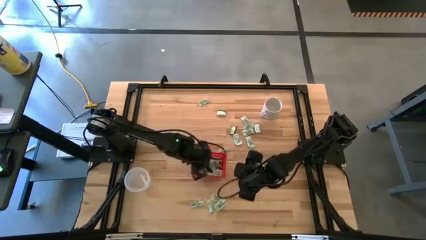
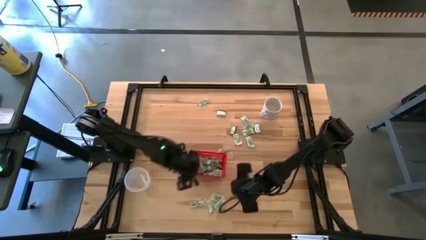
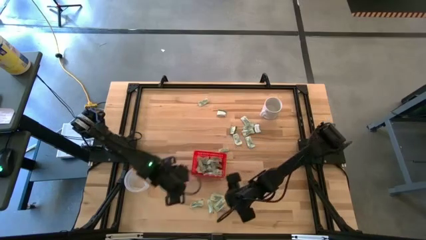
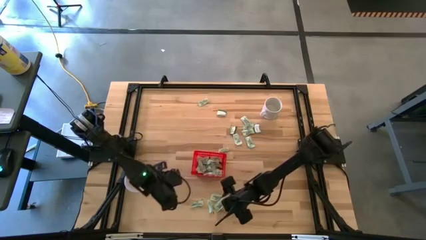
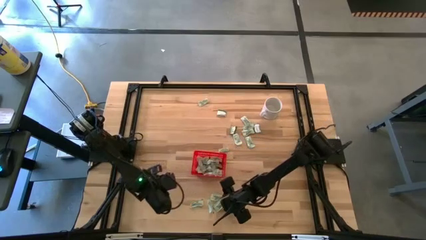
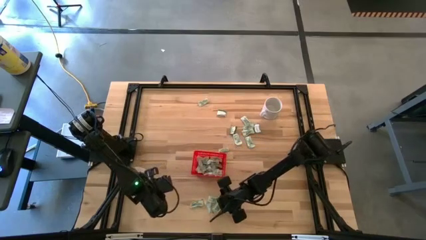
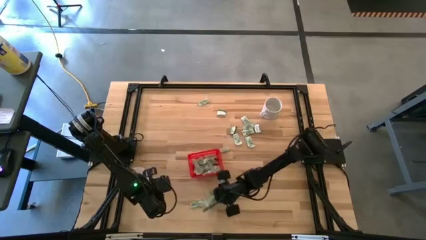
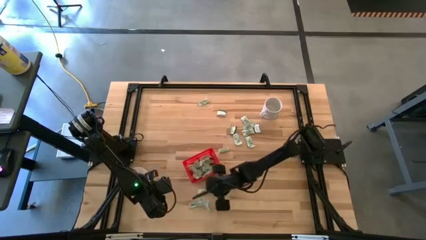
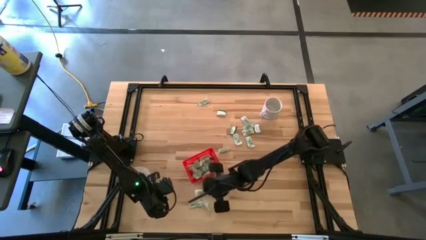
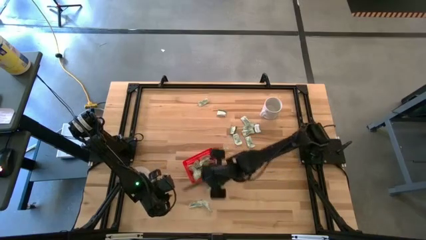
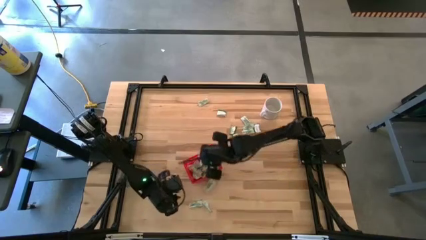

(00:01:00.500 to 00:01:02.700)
Task: Pick and place Stevia / Truvia into bins
Put the green stevia packet into the red basket

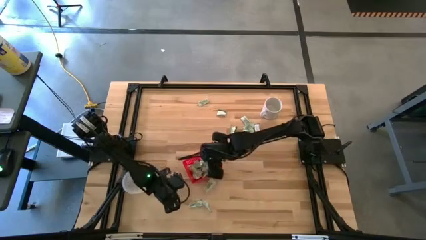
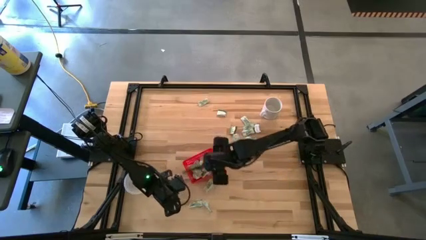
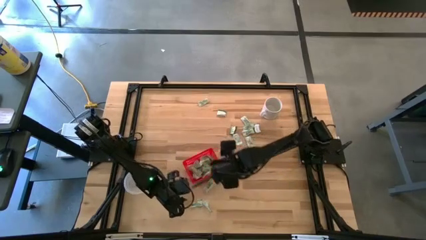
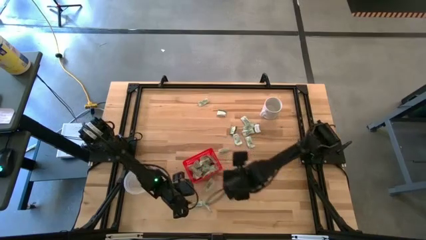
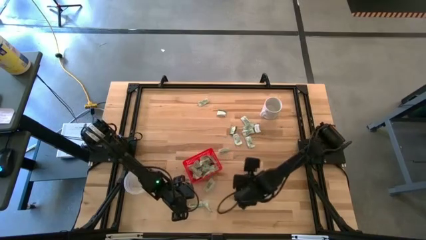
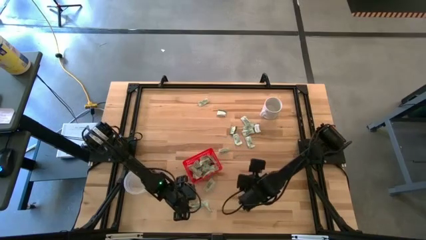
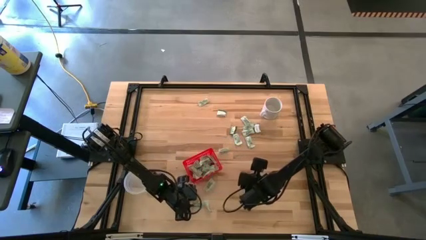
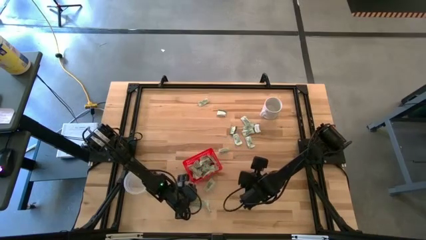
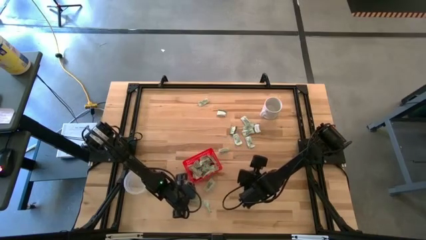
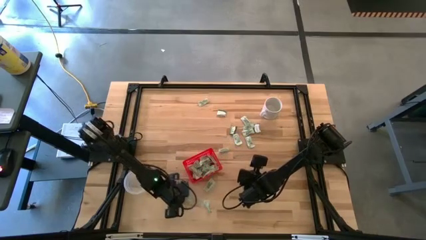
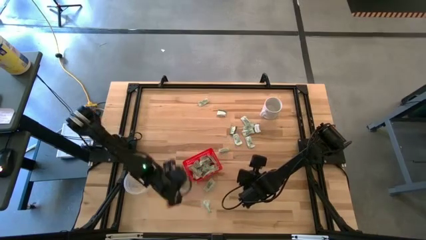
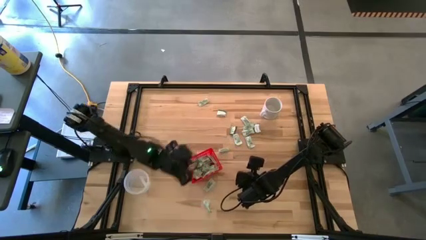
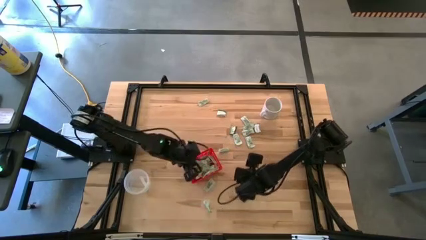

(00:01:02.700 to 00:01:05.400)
Put the green stevia packet into the red basket

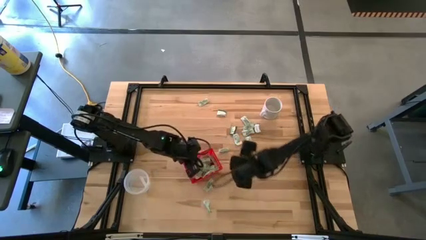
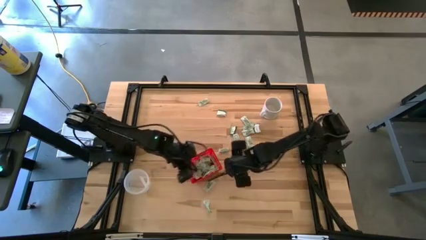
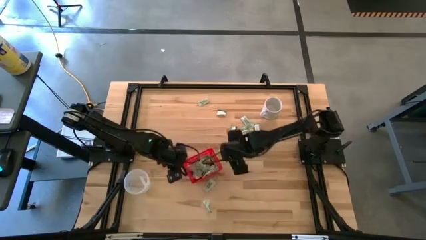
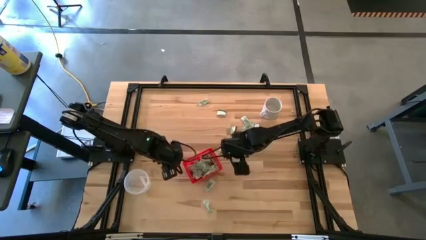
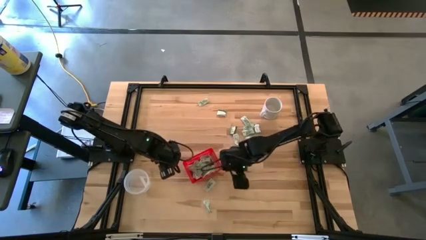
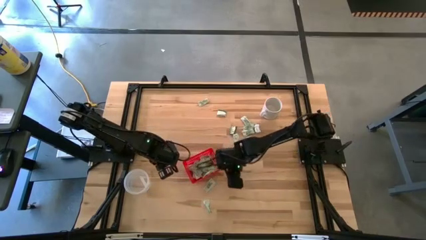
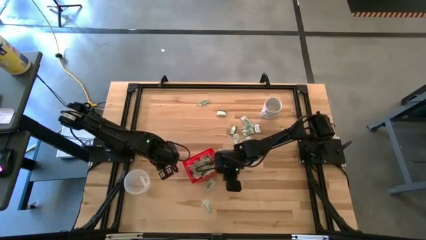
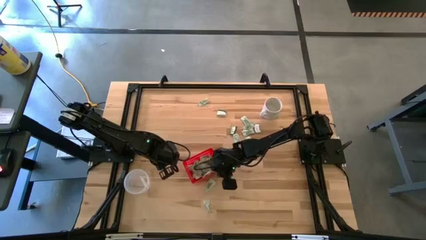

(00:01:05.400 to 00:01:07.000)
Adjust the red basket on the table

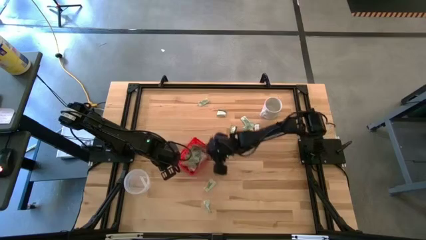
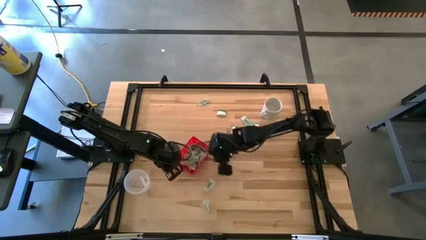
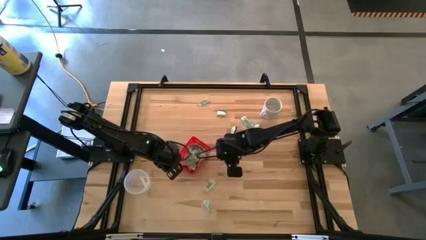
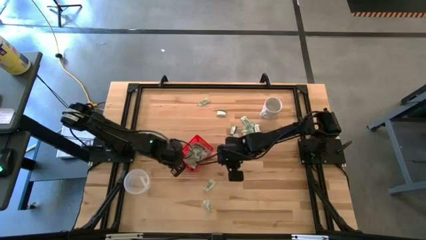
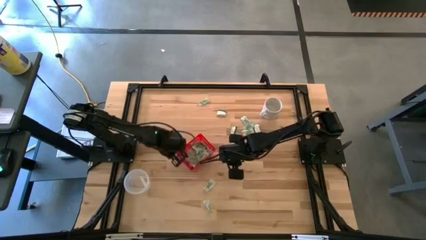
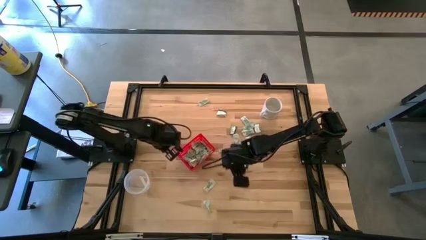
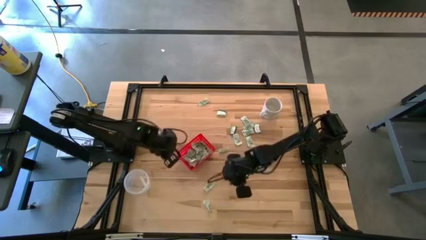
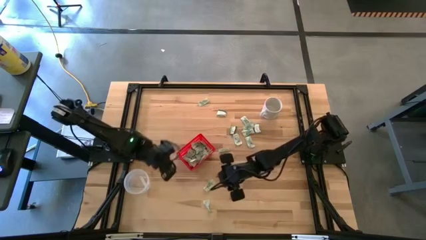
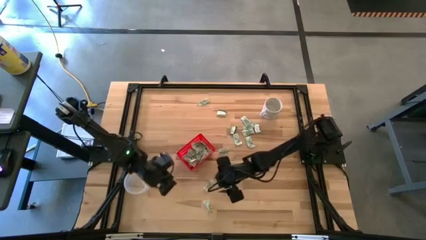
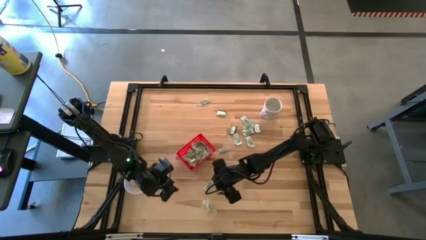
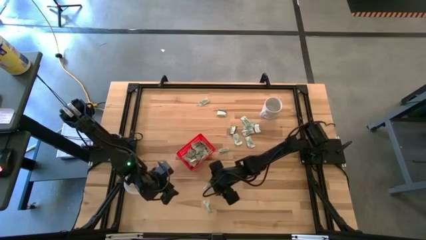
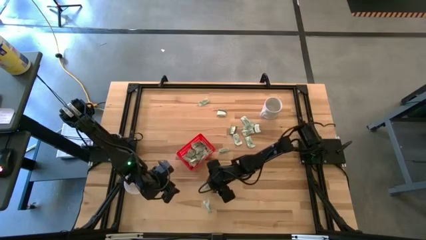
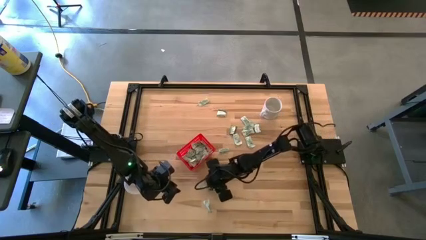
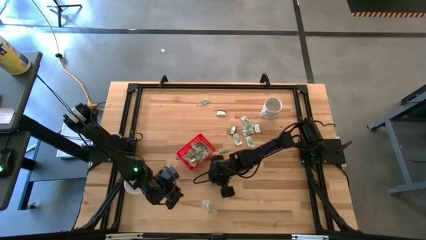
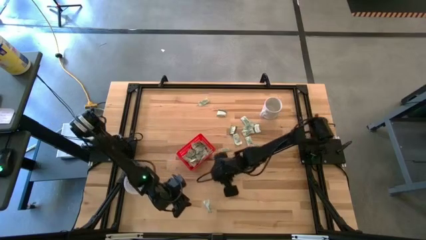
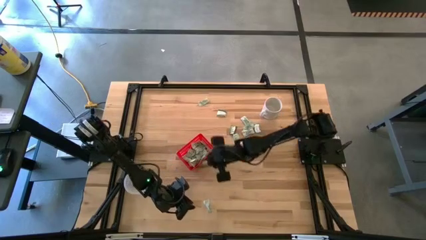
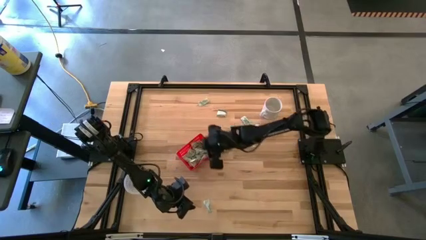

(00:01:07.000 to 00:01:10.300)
Put the green stevia packet into the red basket

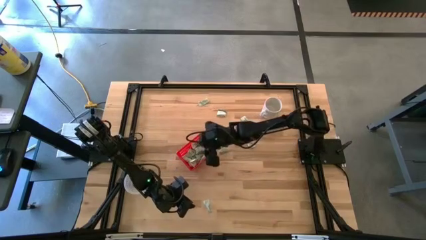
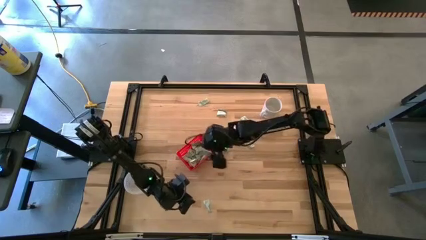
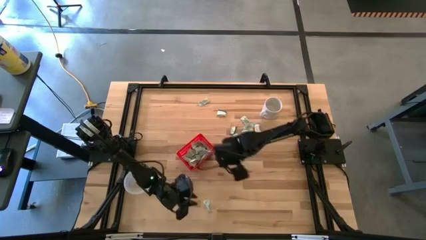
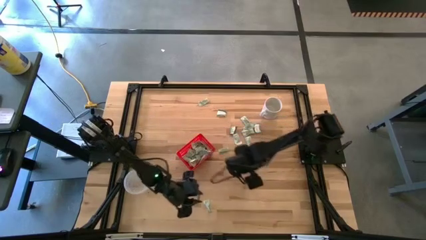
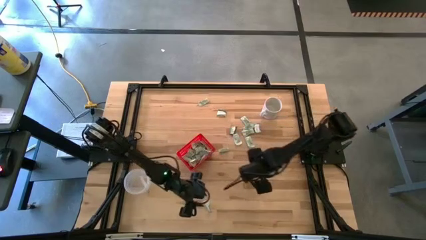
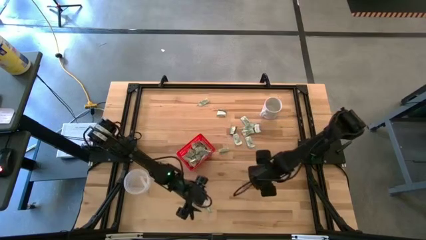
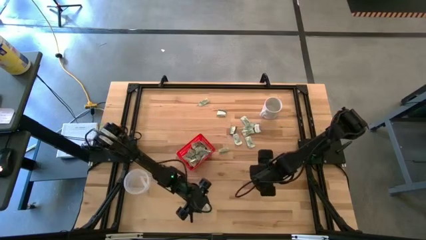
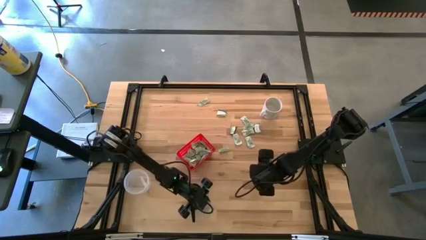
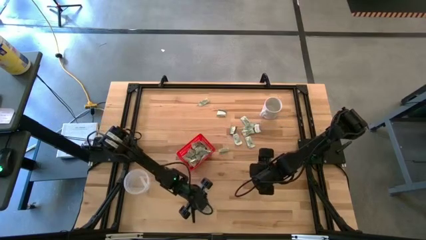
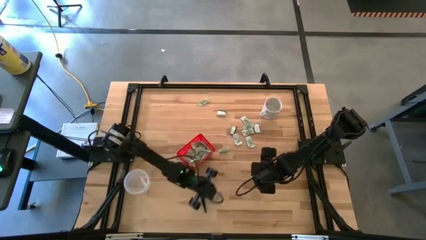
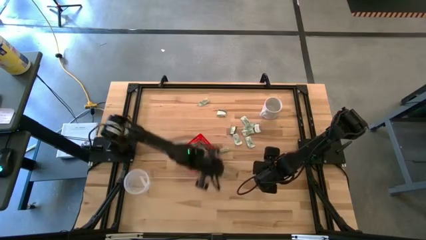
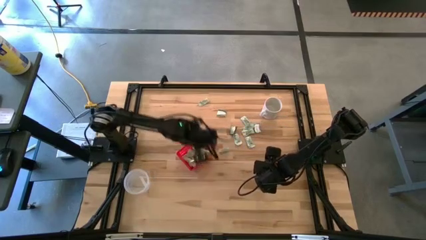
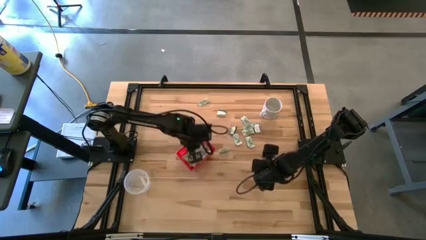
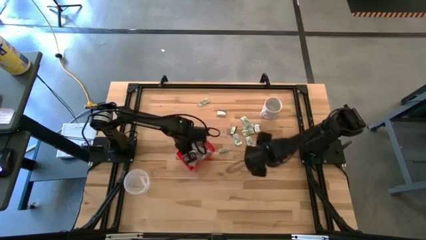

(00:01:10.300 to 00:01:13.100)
Put the green stevia packet into the red basket

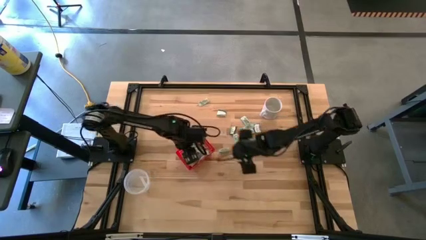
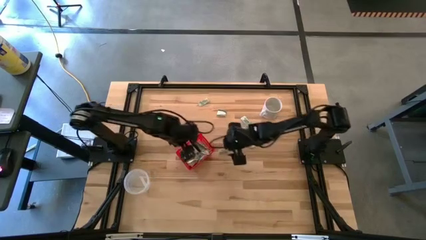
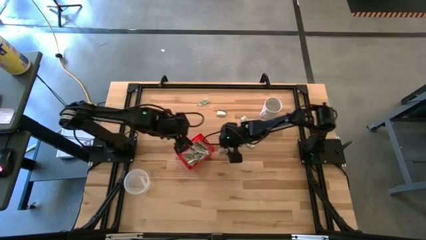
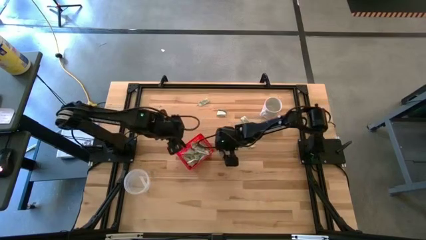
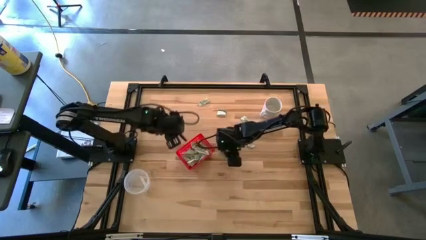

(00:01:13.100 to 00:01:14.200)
Put the green stevia packet into the red basket

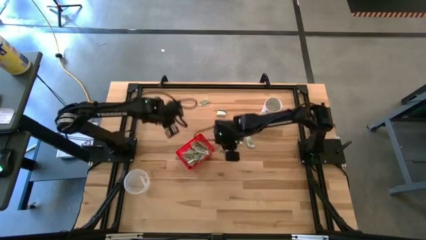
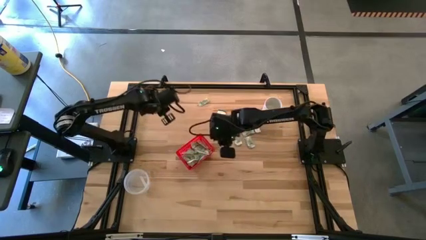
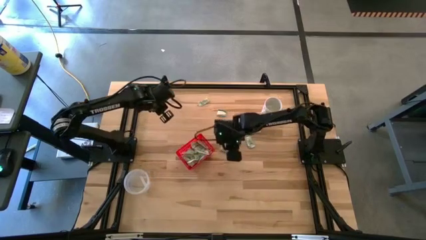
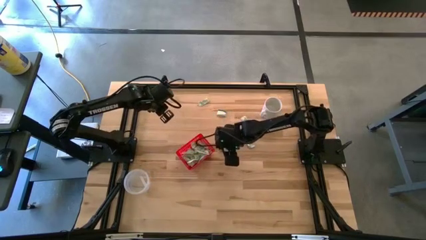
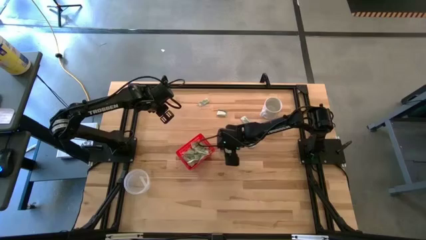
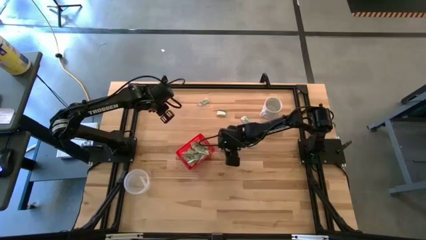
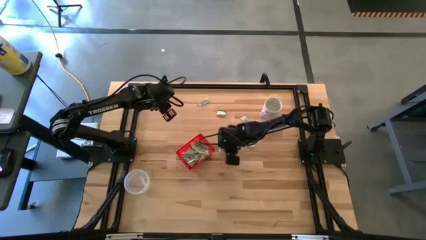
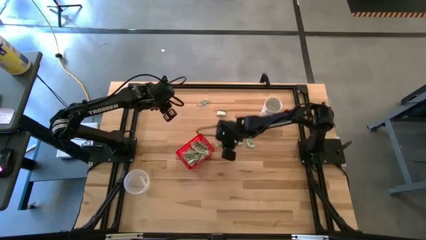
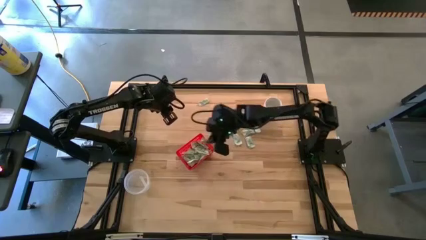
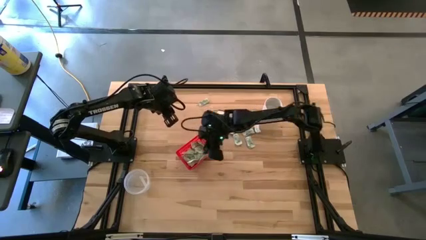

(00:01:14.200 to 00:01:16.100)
Put the green stevia packet into the red basket

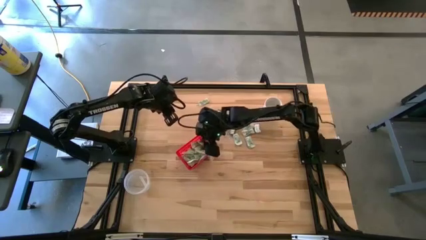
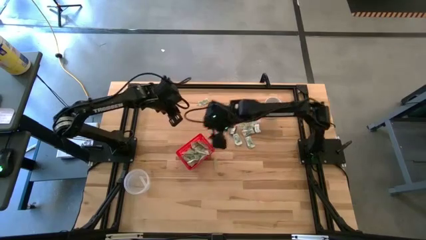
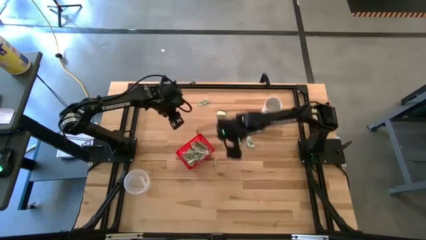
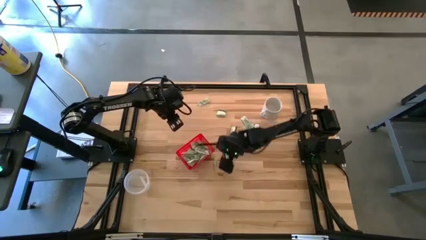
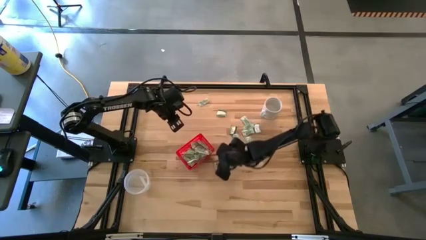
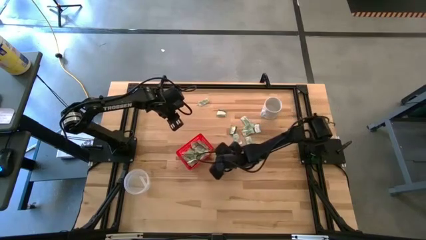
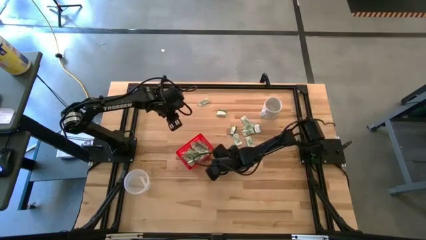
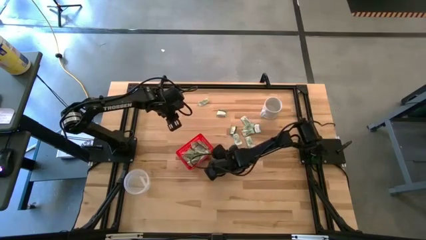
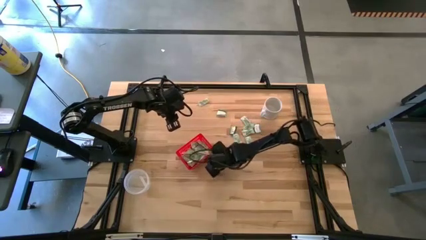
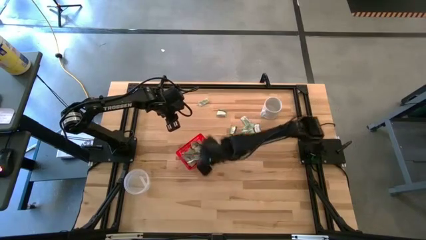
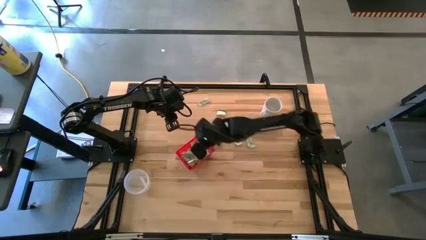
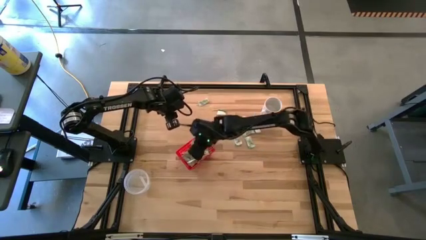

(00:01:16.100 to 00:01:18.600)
Put the green stevia packet into the red basket
